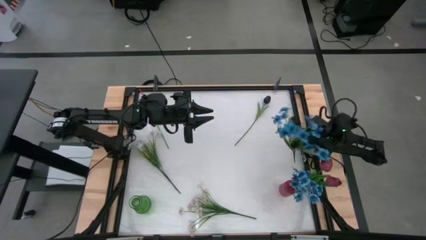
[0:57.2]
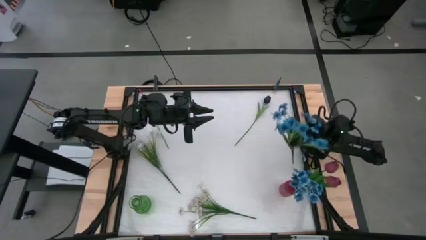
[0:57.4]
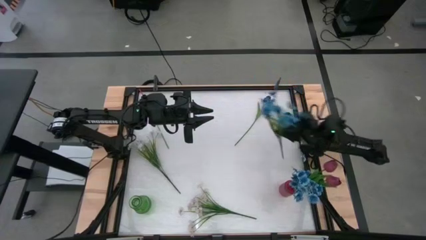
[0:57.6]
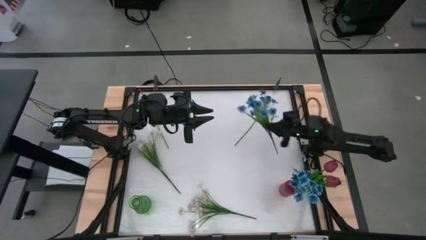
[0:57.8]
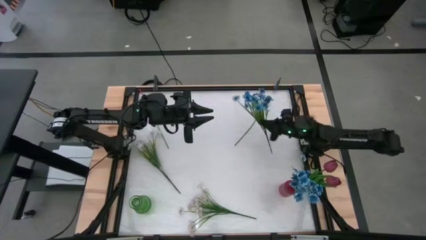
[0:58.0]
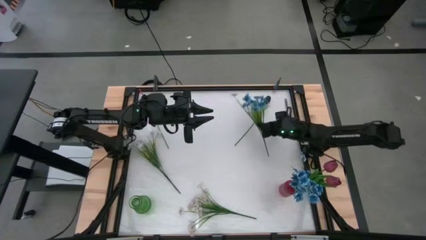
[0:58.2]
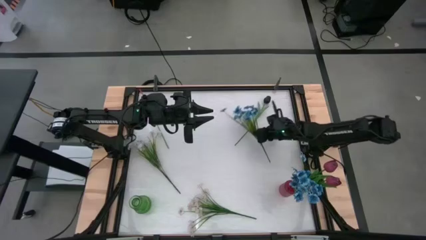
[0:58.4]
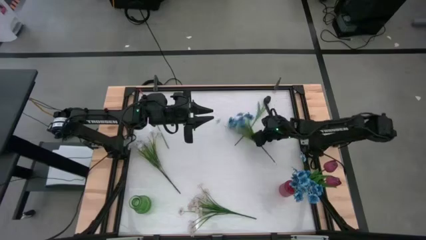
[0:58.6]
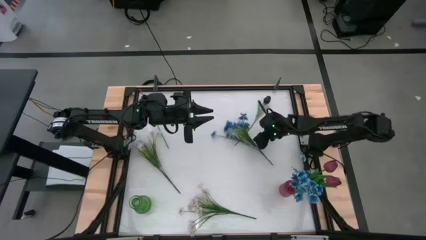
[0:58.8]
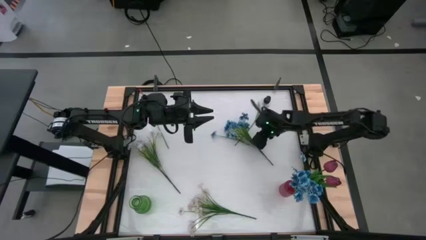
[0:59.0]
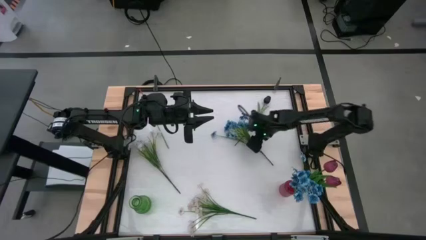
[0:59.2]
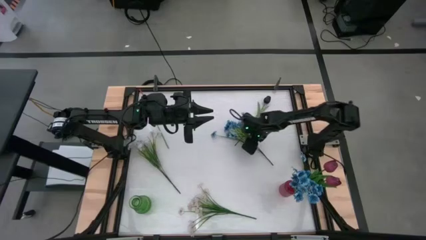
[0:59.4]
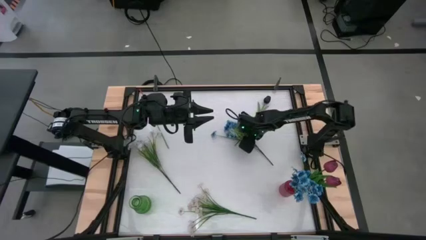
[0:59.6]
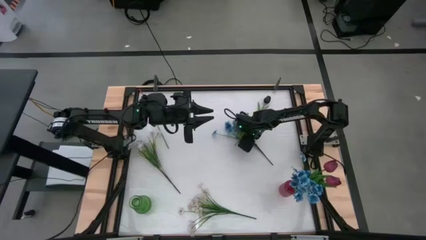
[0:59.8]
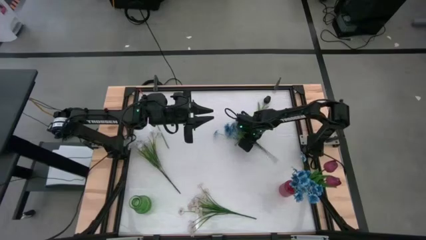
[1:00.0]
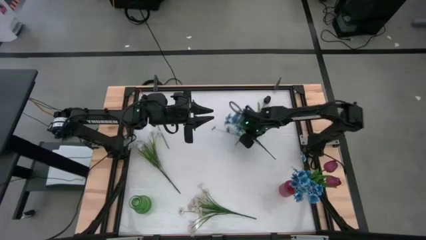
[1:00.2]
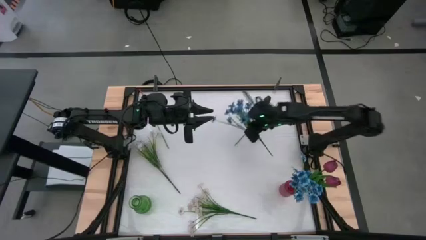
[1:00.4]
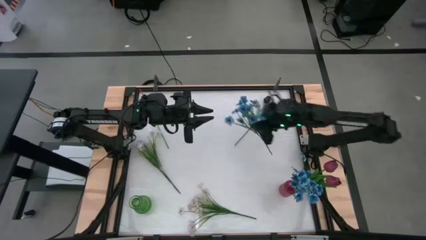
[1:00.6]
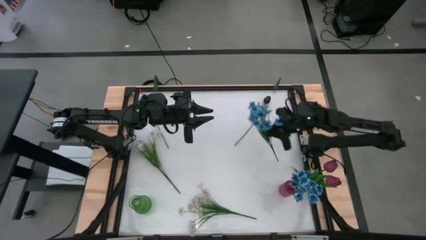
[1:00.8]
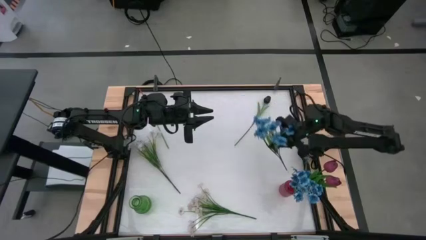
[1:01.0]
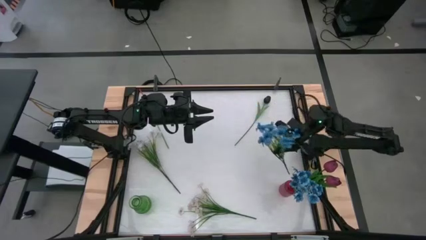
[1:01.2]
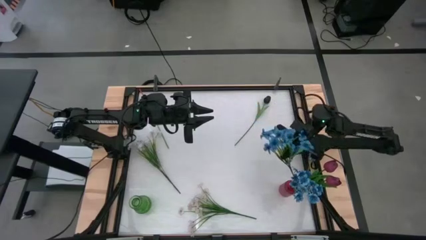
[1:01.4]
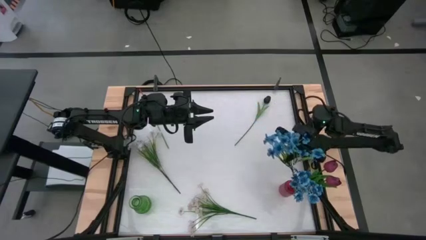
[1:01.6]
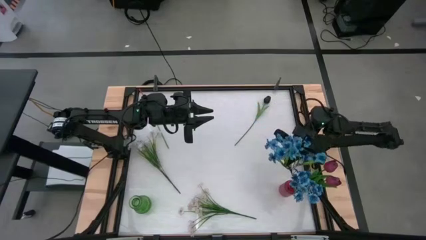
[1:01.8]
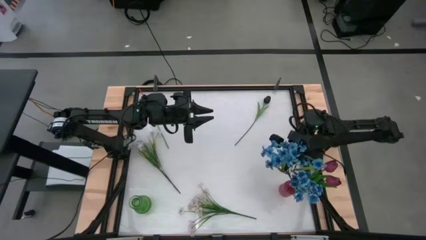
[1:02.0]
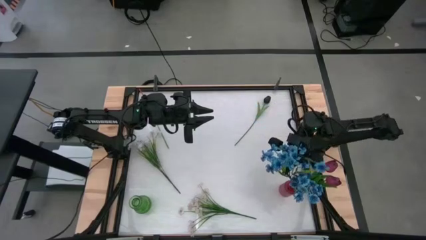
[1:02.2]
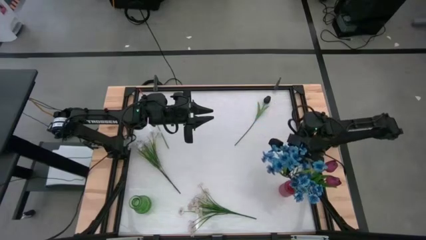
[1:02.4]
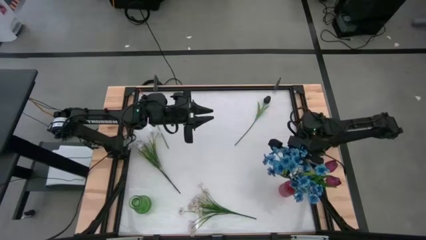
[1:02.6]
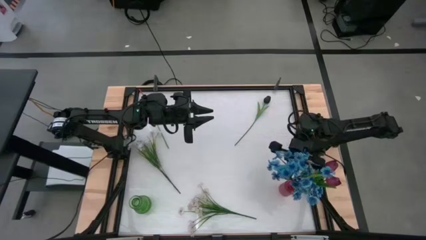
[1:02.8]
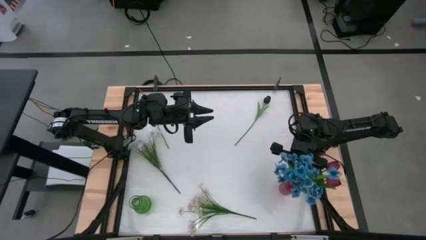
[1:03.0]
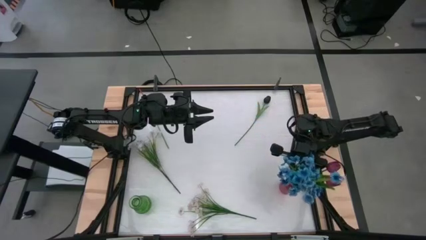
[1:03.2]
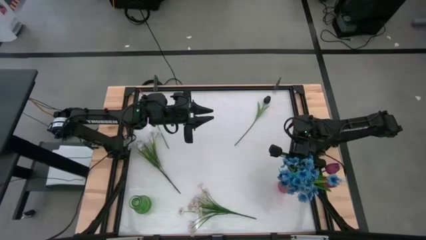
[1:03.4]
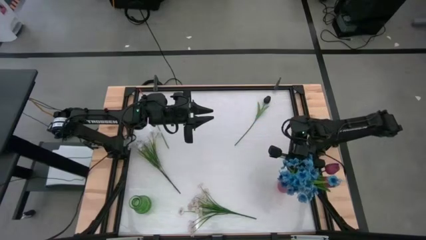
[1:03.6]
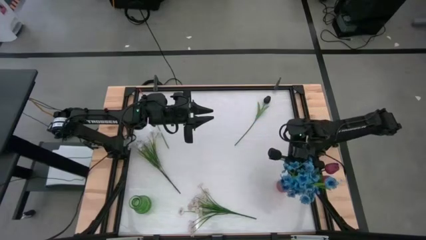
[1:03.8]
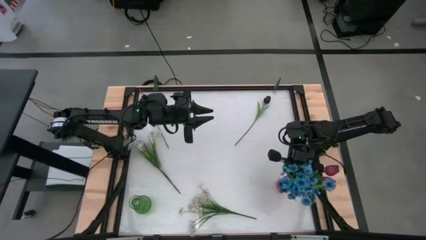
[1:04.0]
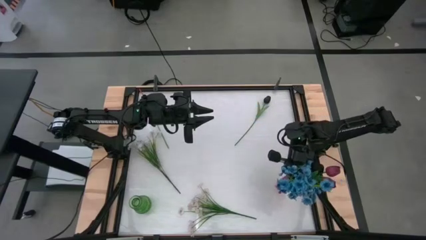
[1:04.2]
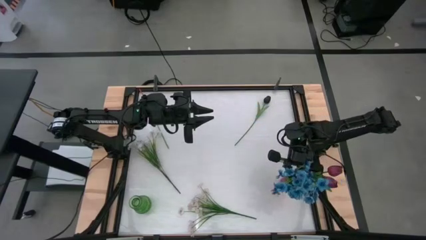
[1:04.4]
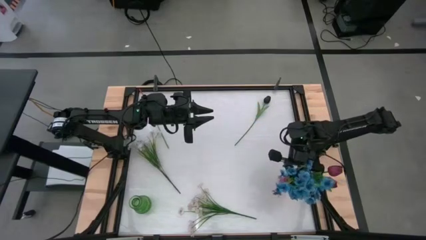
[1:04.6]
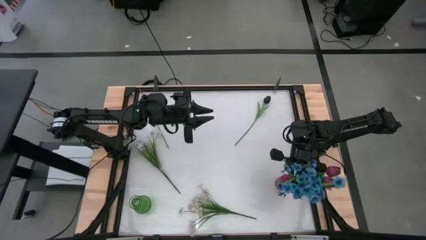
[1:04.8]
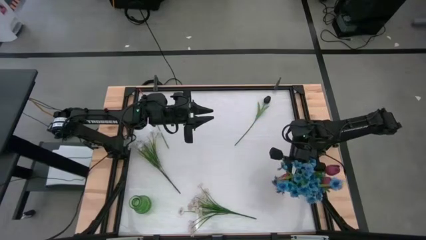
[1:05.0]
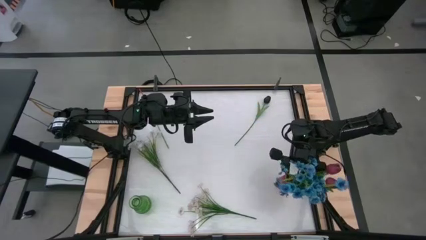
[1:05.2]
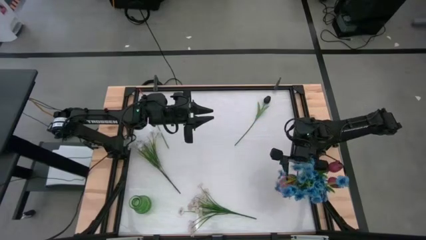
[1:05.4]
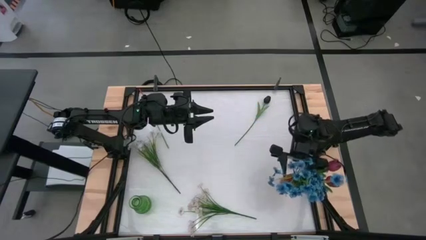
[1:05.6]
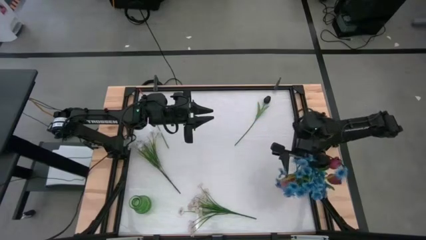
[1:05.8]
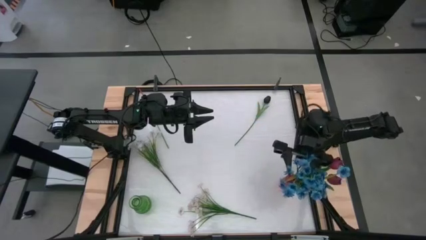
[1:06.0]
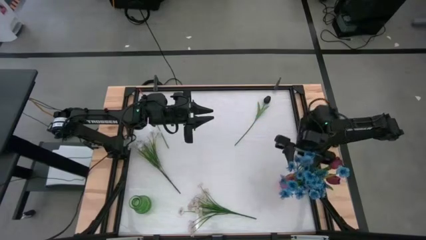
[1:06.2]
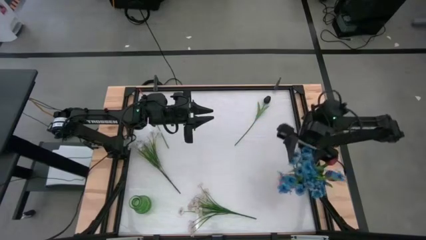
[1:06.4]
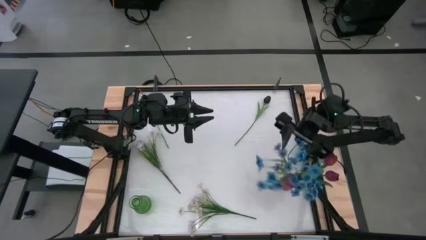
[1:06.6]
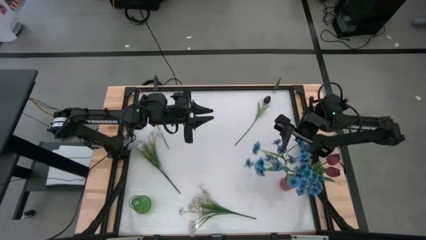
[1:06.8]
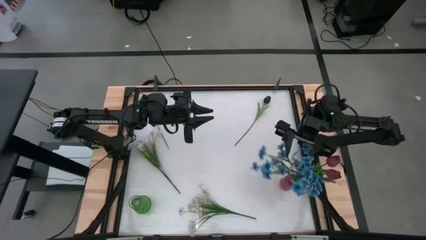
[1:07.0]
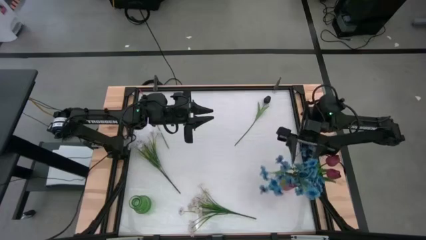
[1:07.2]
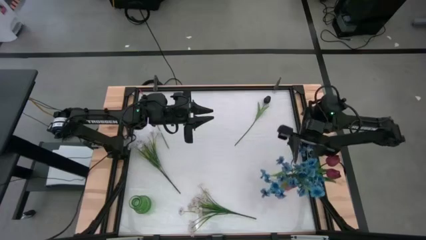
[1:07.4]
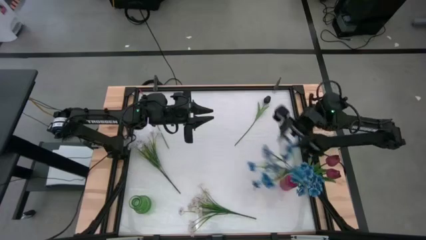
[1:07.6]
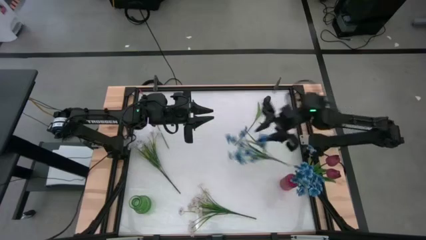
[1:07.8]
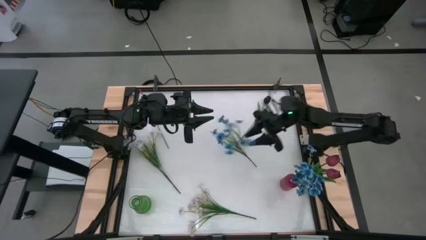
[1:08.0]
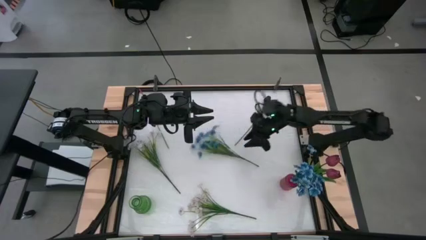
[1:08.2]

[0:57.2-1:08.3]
Task: Sort flowers into vase by color
Put the blue flowers into the red flower vase

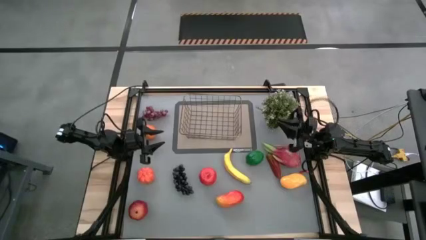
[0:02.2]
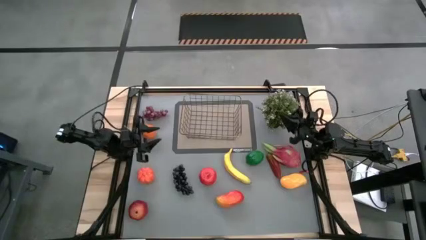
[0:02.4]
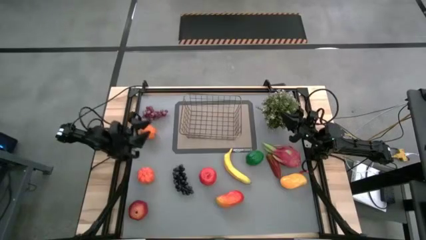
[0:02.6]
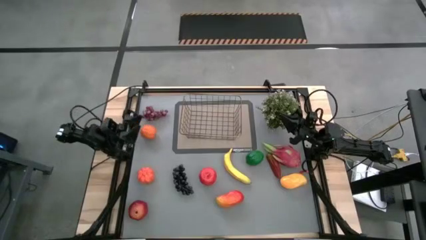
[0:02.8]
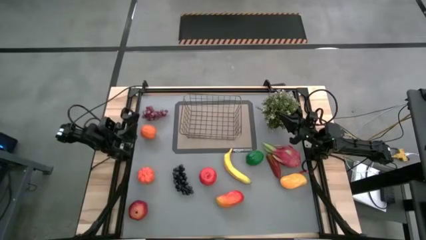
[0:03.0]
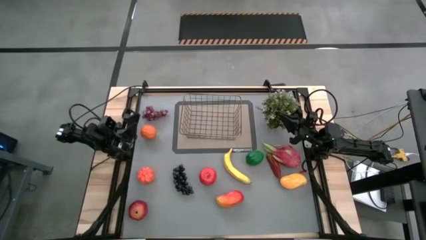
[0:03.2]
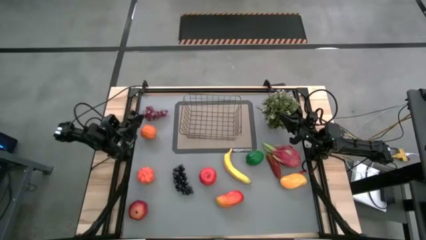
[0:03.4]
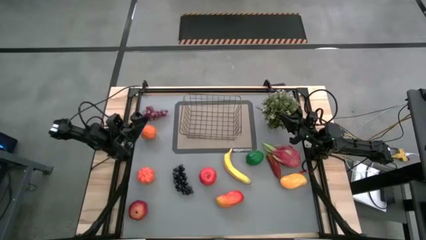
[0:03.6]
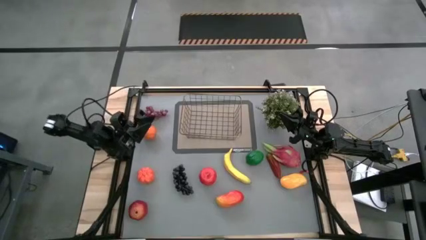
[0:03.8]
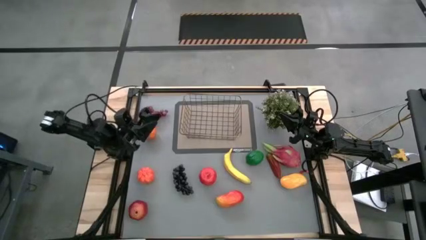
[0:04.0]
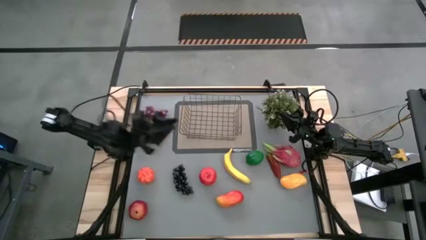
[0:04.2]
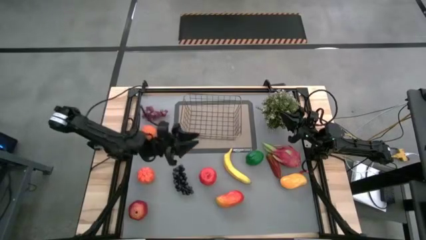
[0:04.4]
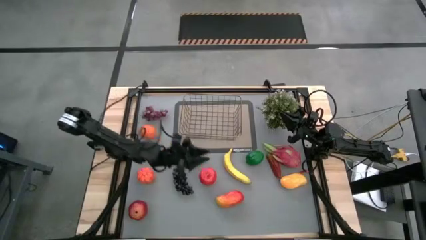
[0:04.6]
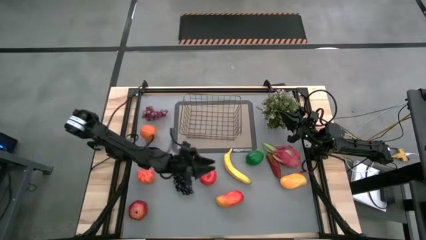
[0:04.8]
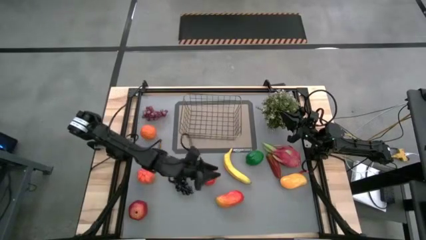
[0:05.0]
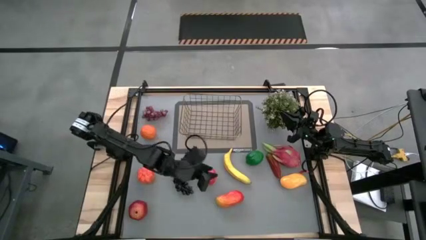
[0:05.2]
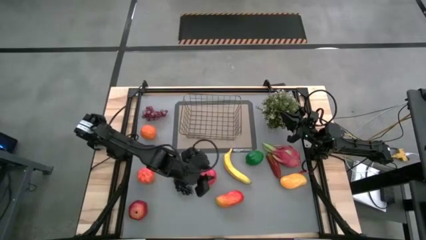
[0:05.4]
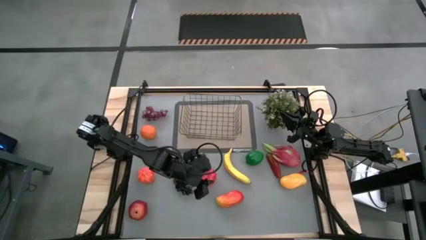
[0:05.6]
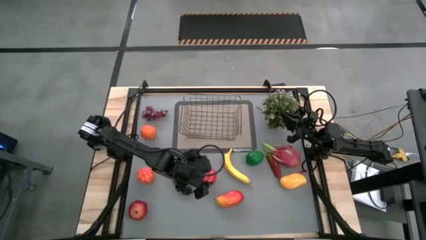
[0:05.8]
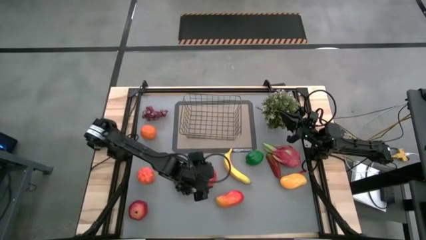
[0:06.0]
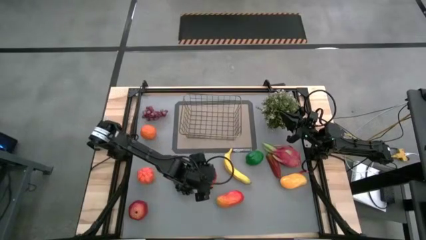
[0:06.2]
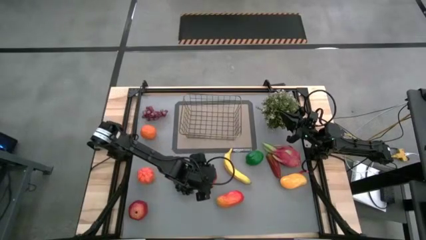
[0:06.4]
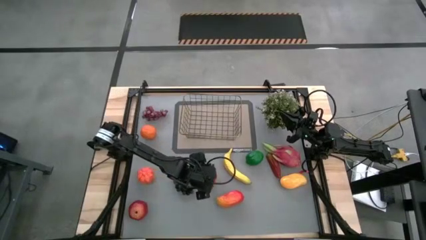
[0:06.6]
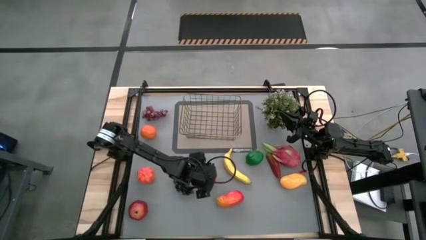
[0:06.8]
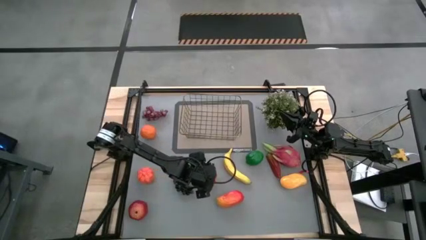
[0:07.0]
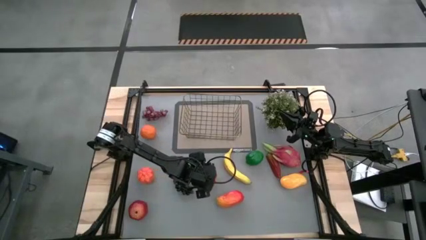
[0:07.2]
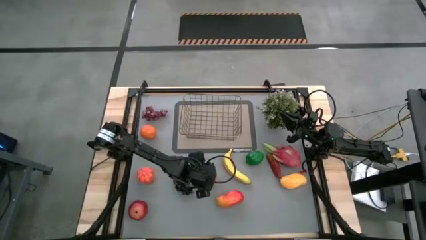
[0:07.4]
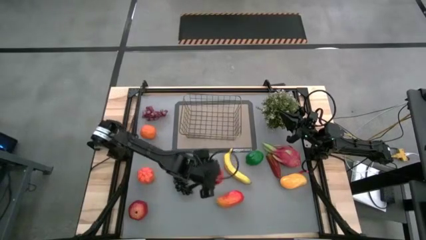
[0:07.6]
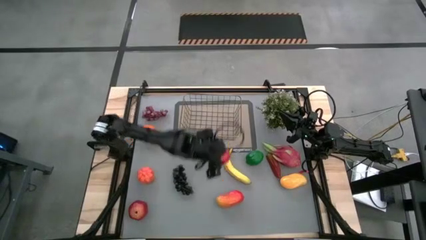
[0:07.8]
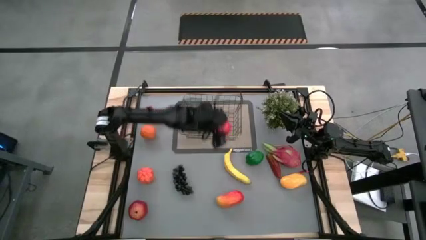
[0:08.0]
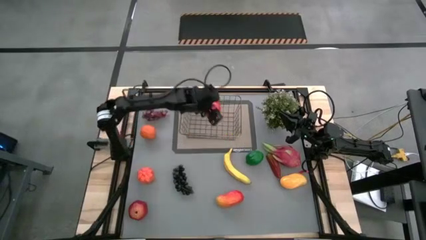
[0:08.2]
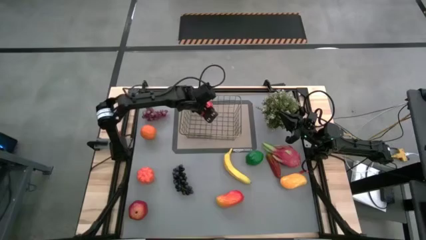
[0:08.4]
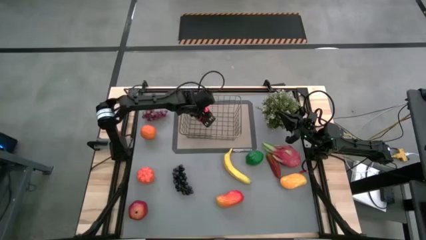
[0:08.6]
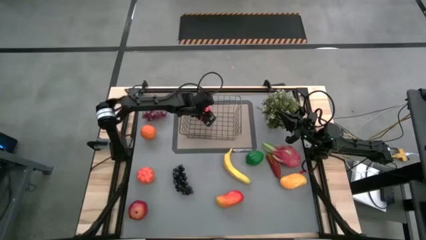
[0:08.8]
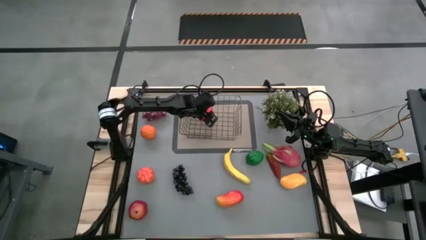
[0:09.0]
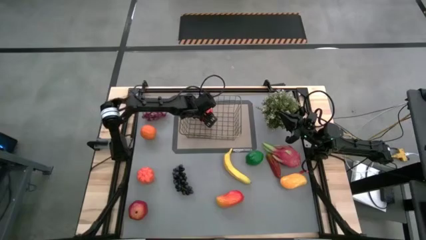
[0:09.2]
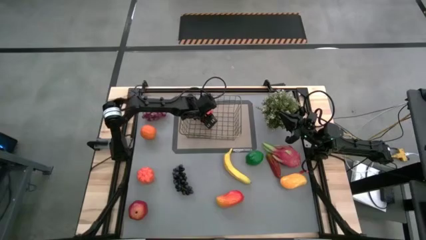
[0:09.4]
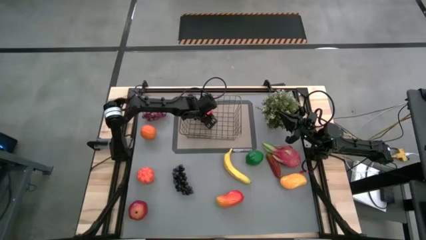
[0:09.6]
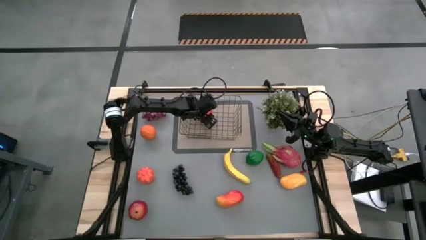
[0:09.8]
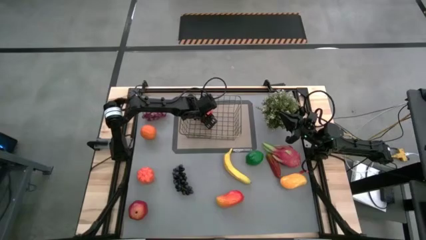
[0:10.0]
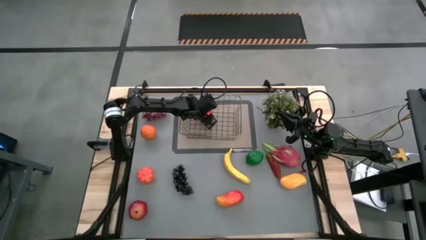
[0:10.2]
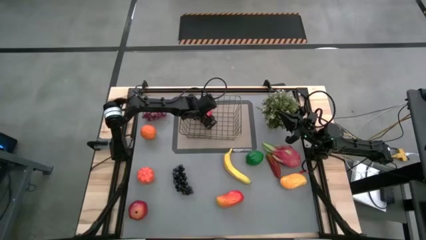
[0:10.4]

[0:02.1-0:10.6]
Task: Build produce basket
Put the apple into the wire basket
